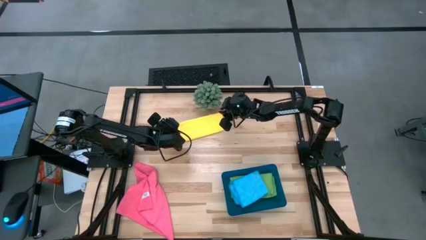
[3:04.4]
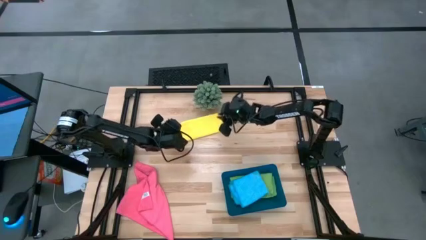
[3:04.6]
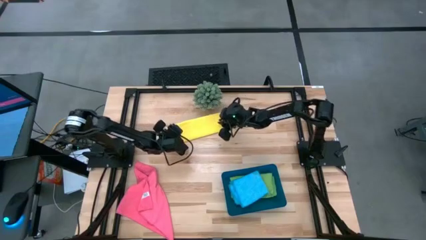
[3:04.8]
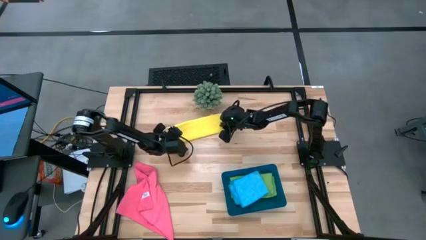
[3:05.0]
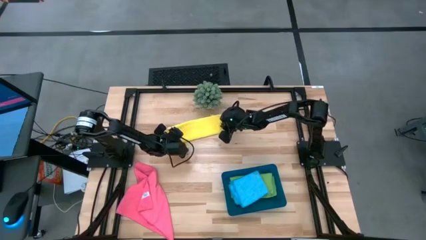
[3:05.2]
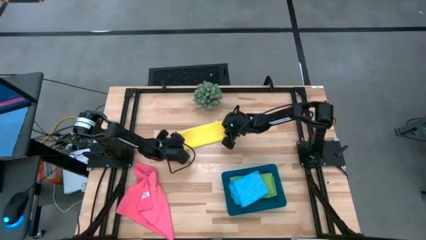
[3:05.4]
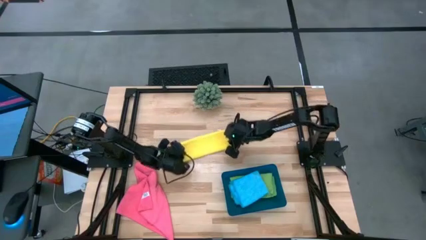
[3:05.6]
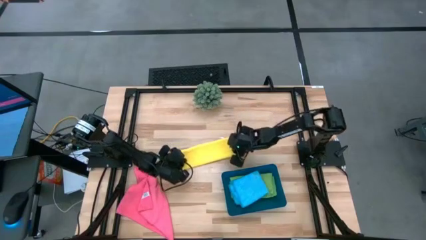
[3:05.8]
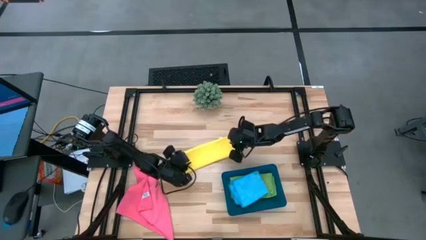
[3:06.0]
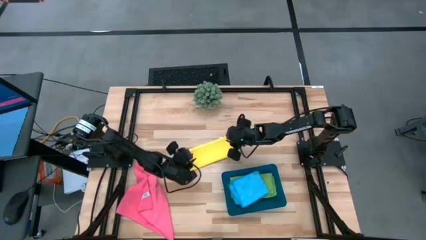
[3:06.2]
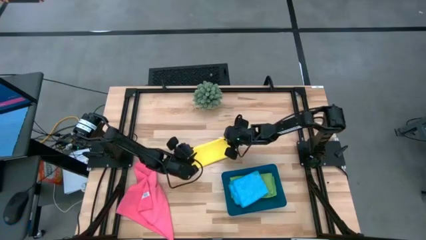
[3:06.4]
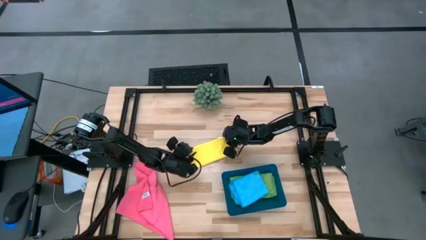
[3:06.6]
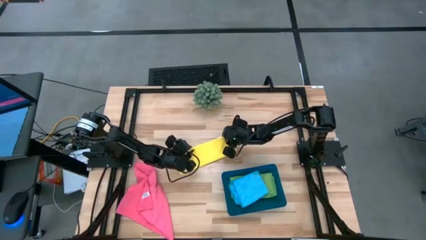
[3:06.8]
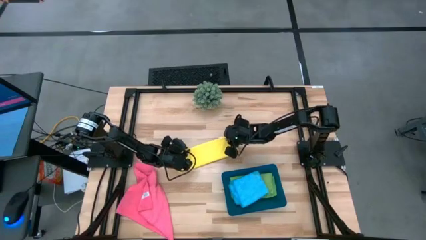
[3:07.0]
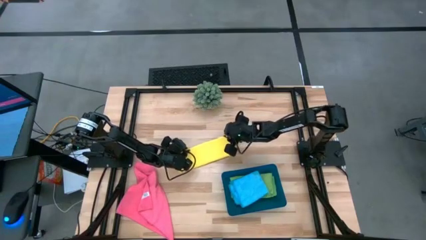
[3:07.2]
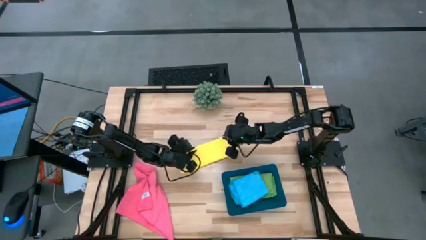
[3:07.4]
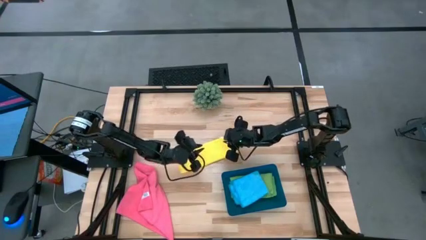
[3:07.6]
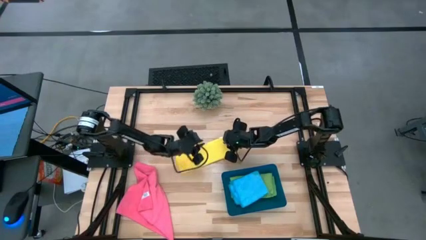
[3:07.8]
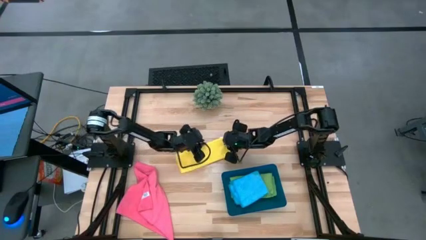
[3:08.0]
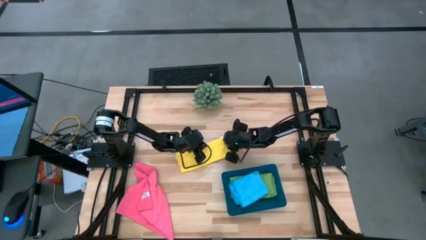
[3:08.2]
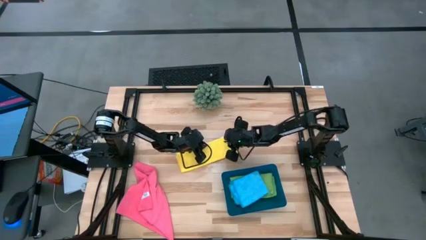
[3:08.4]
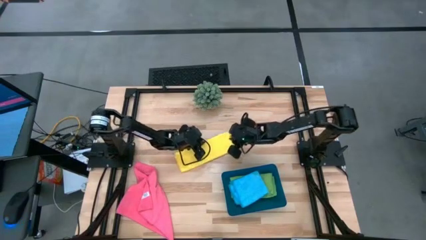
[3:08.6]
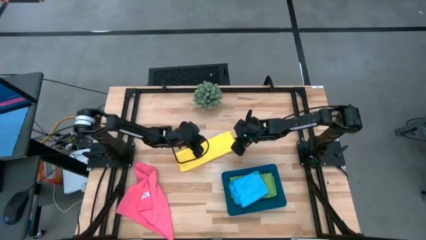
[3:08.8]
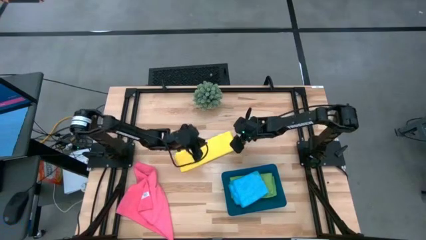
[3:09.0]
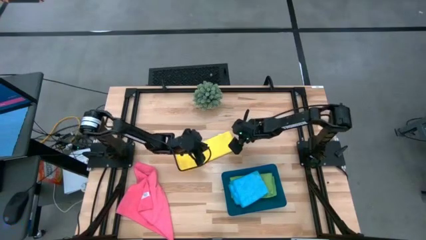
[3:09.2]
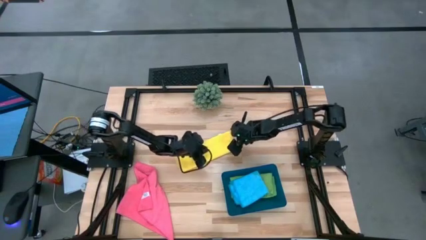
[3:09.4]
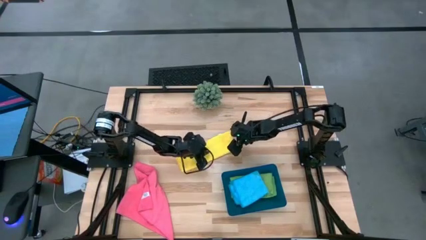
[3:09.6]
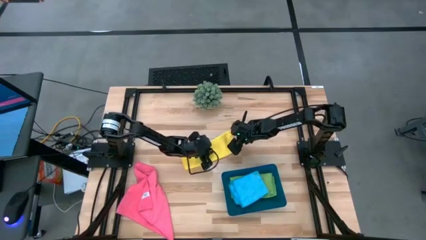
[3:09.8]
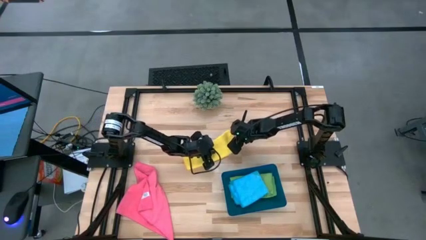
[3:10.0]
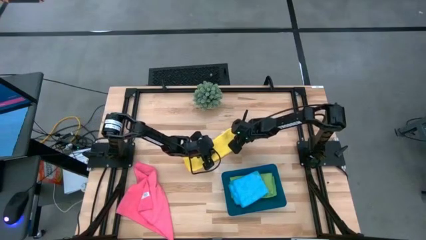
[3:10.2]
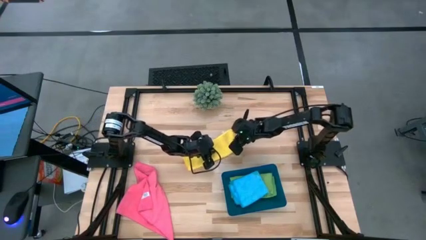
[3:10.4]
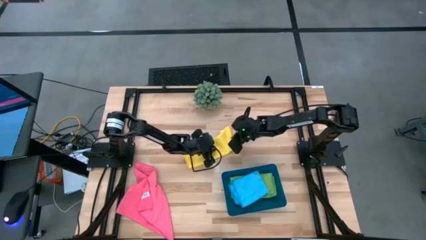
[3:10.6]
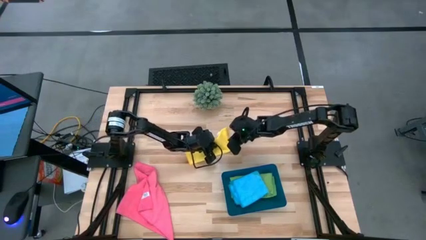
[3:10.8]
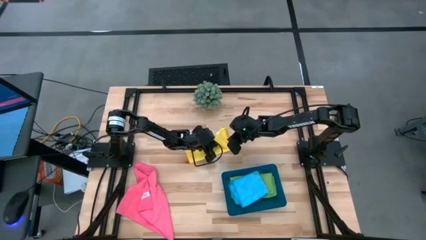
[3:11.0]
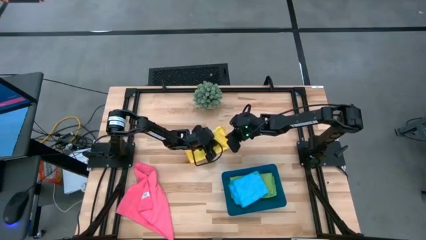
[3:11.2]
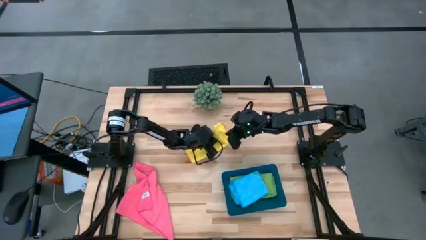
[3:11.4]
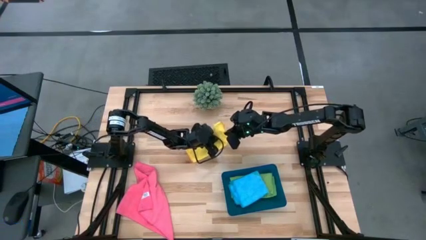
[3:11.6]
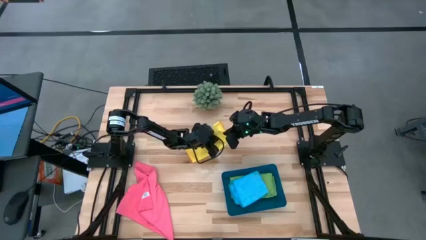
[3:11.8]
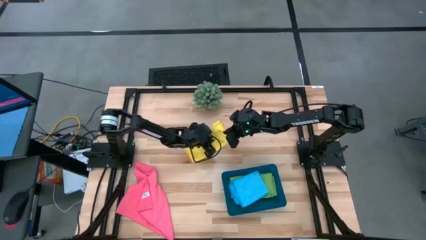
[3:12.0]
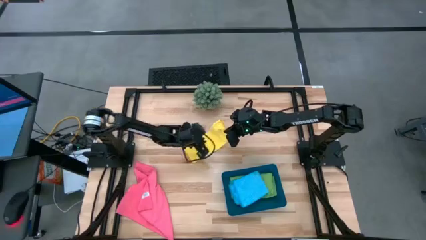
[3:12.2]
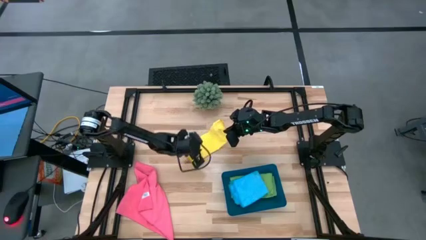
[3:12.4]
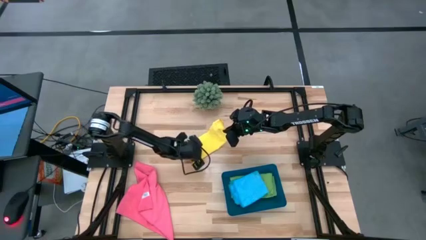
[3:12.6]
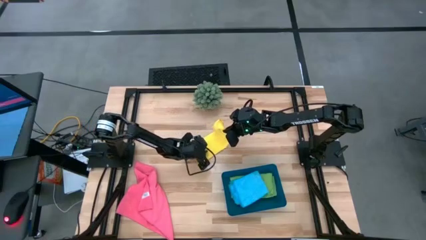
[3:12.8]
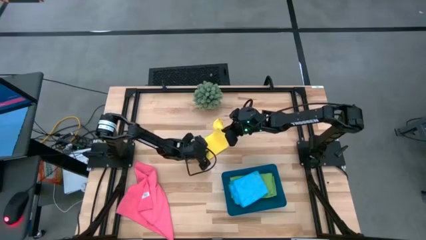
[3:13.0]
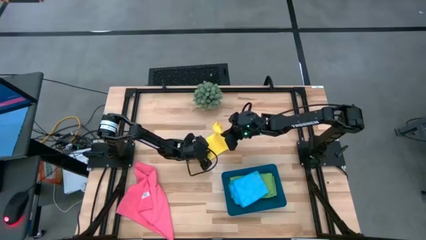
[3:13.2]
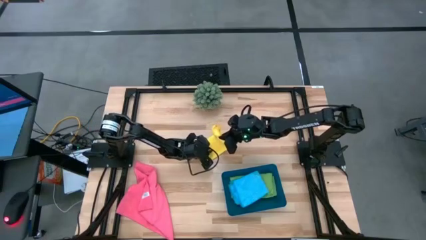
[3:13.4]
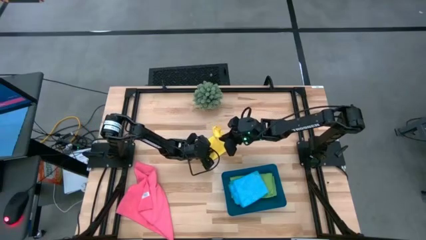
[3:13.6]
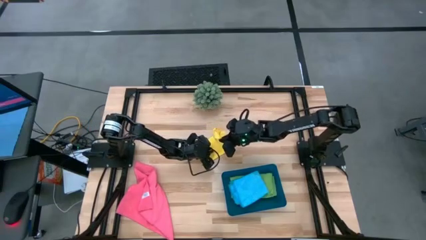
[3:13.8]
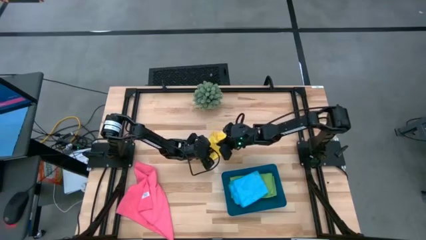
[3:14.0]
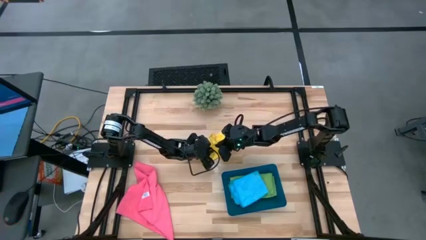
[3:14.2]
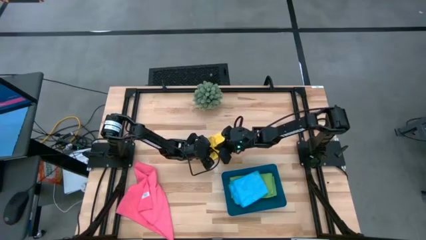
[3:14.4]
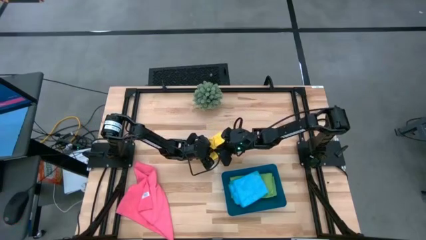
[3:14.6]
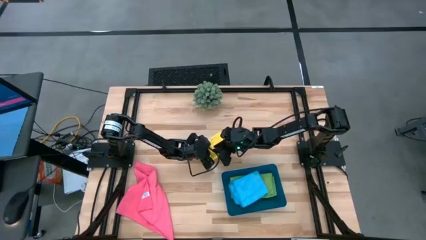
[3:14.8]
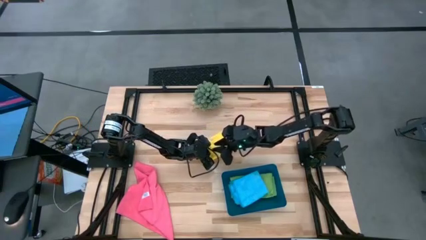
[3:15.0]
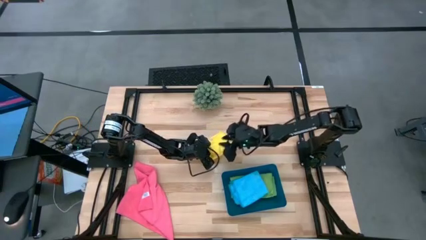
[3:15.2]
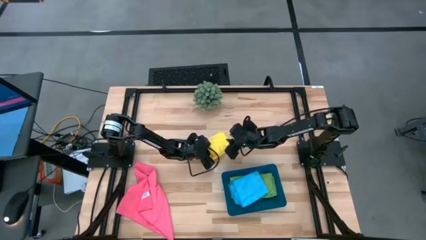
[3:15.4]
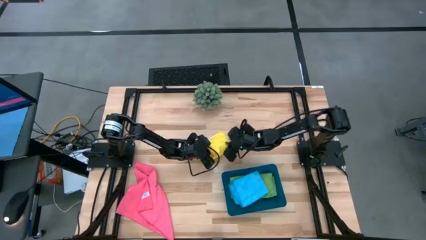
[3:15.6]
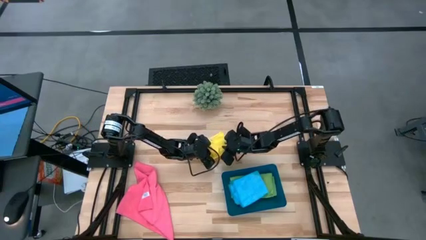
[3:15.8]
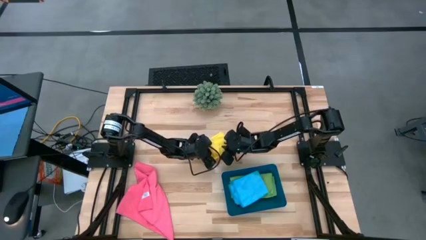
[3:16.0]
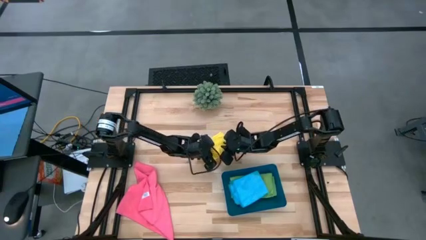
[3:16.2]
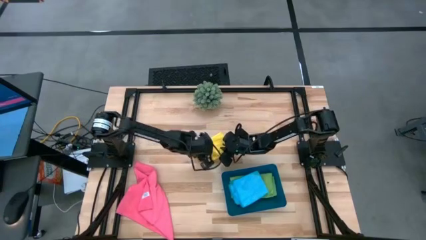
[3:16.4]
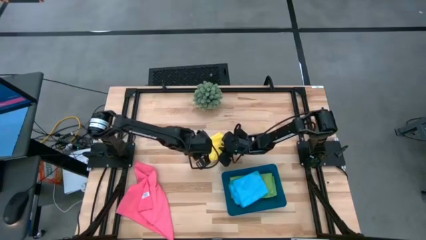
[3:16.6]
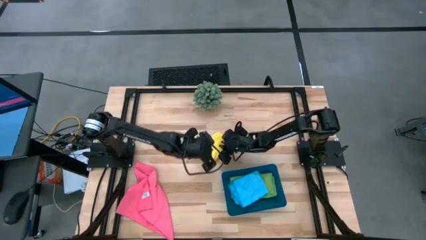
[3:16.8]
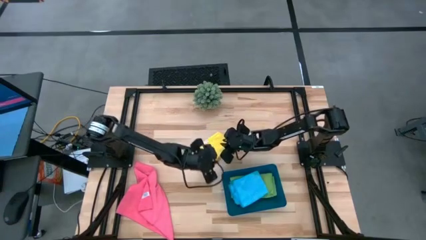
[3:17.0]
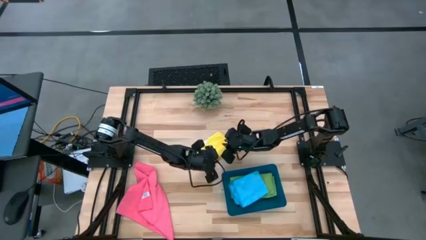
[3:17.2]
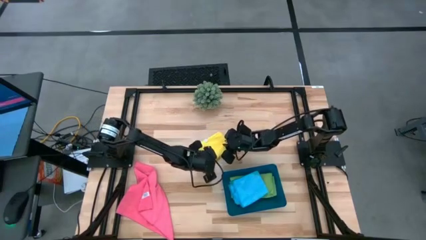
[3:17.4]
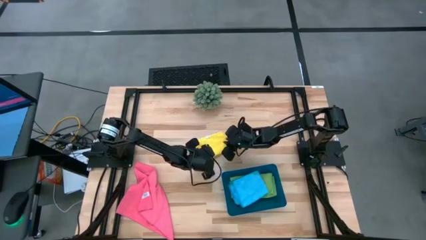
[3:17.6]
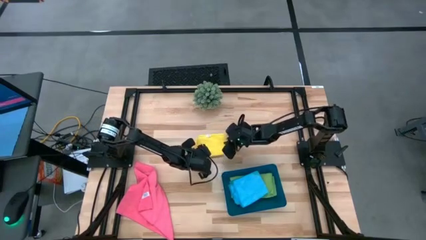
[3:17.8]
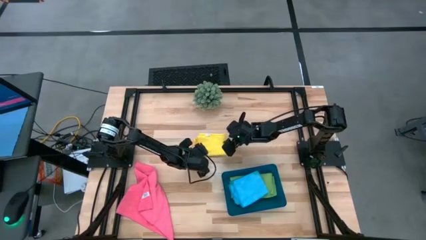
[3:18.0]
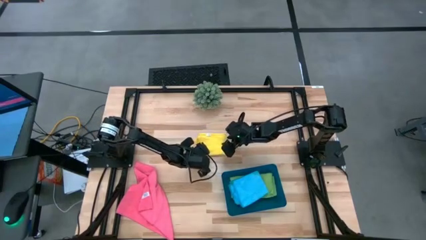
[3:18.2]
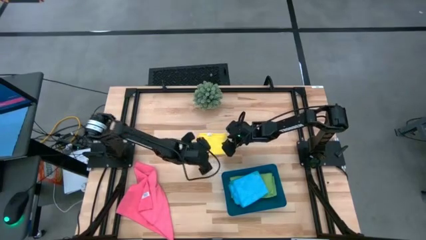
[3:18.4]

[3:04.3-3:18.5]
Task: Fold microfiber towels
Fold the yellow microfiber towel

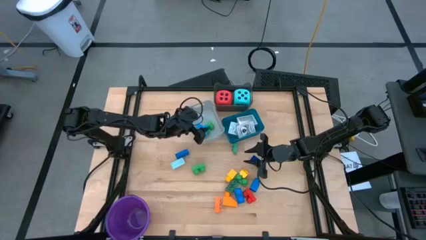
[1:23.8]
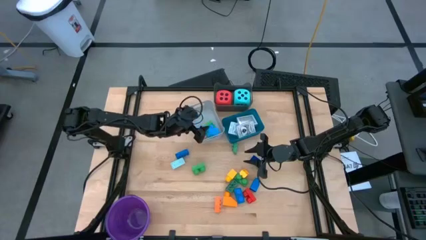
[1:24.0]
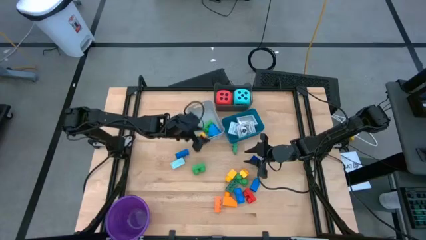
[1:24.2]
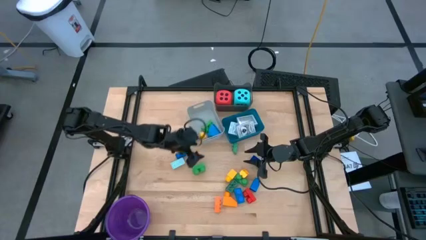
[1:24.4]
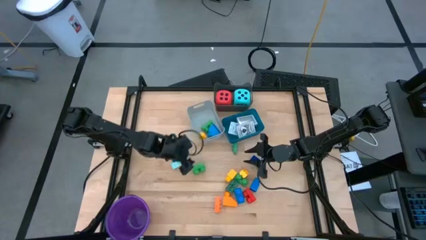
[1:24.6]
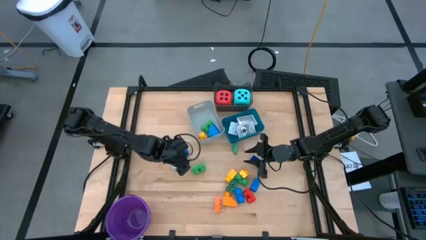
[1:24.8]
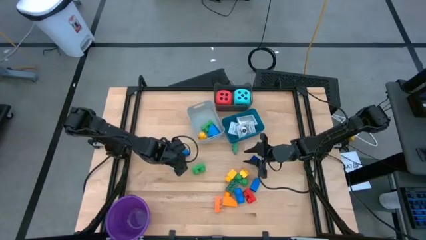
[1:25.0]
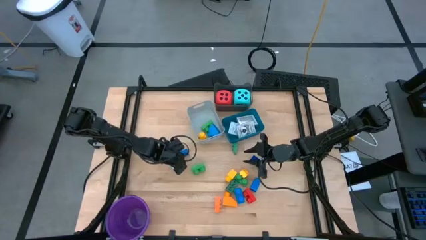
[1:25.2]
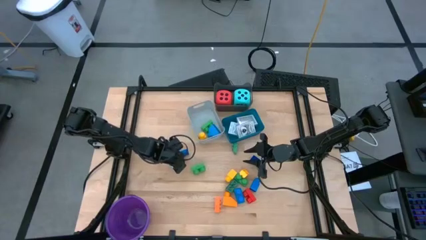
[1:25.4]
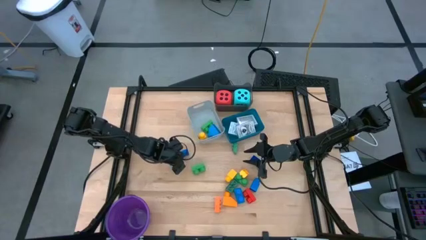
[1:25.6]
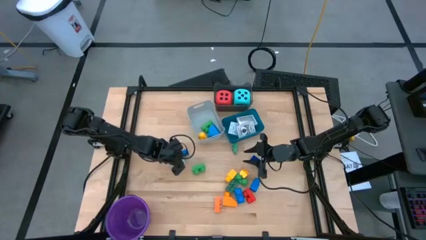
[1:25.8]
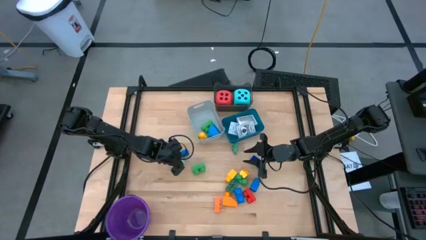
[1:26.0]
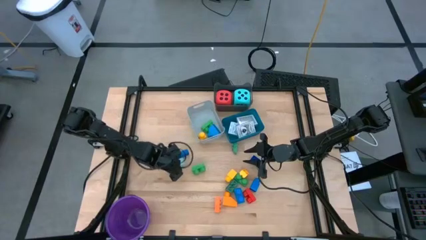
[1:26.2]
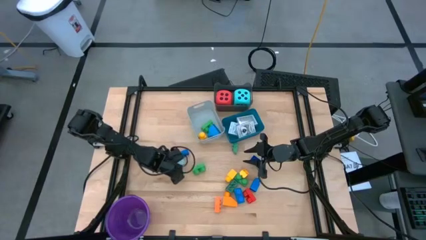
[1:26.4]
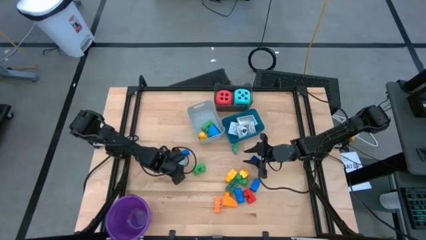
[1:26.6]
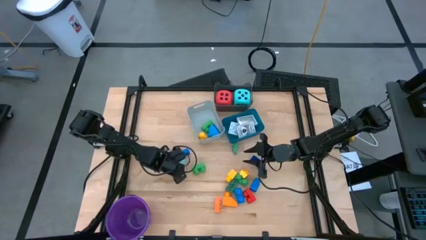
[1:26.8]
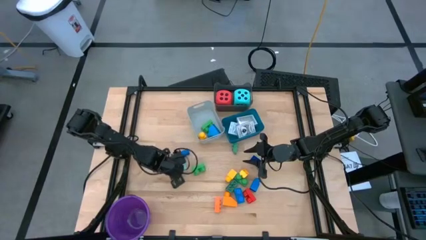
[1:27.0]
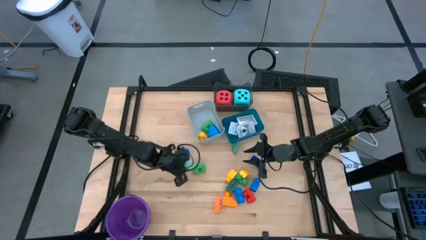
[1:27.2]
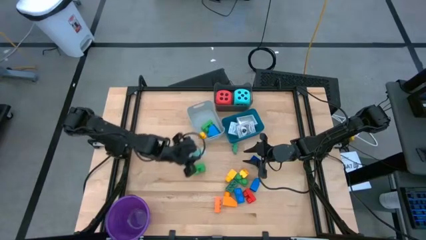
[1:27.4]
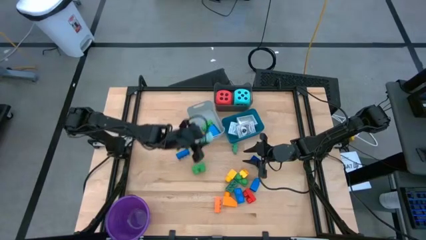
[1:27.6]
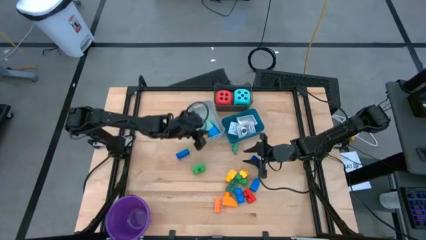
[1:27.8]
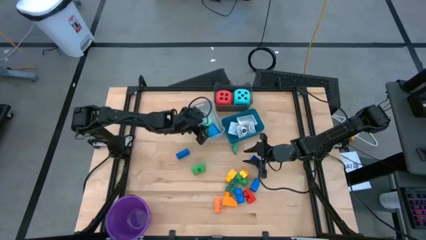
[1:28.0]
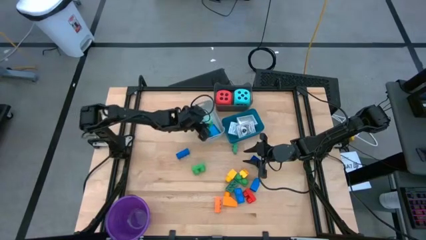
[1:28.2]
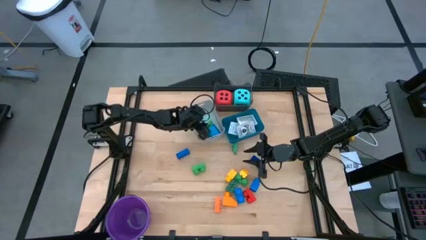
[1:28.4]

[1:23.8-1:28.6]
Task: Pick & Place Toys
Put the light blue game piece into the gray bin
